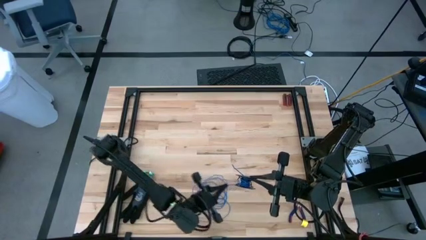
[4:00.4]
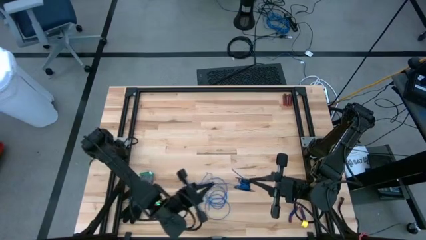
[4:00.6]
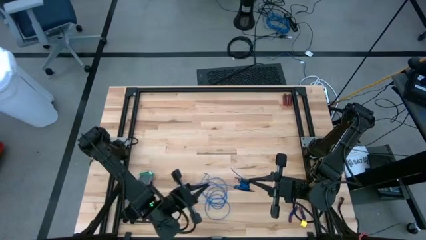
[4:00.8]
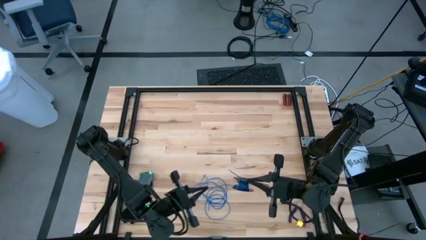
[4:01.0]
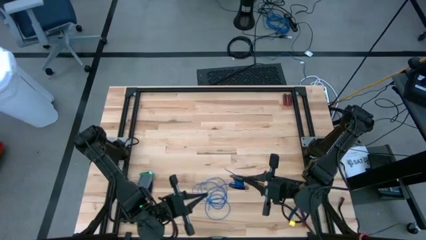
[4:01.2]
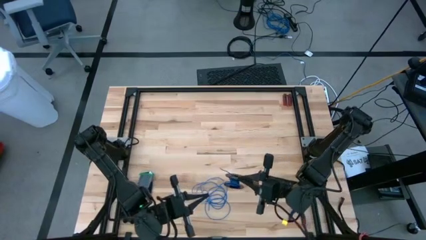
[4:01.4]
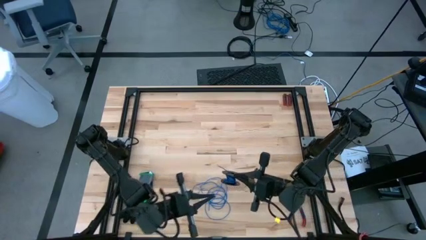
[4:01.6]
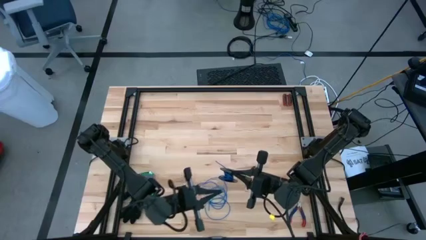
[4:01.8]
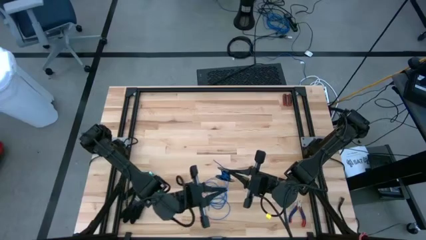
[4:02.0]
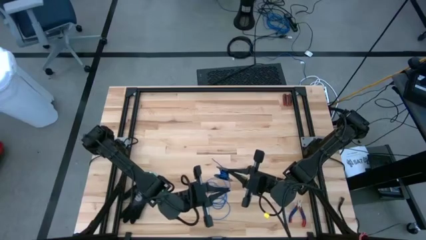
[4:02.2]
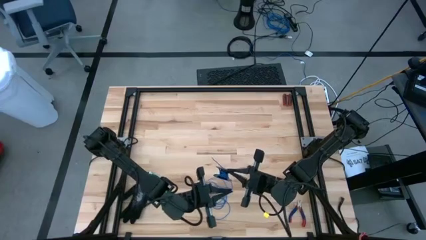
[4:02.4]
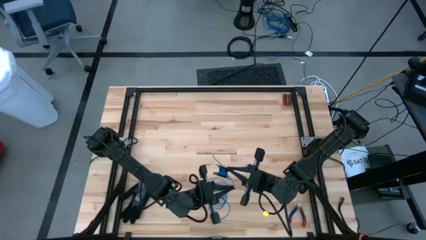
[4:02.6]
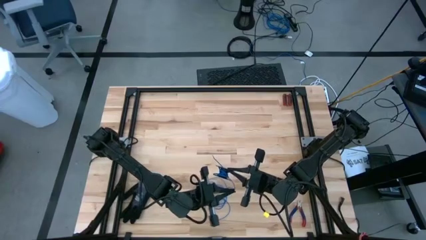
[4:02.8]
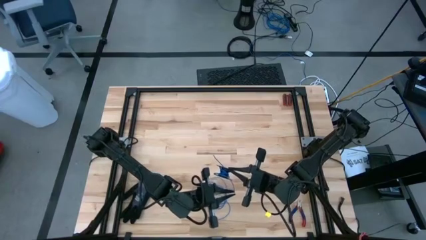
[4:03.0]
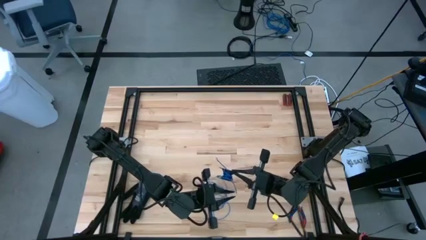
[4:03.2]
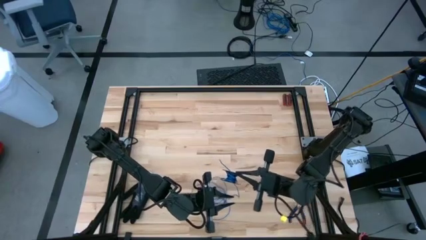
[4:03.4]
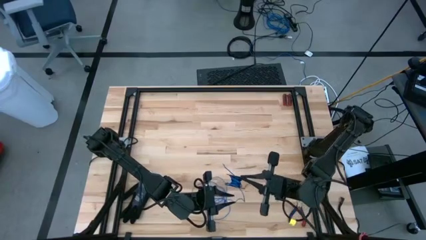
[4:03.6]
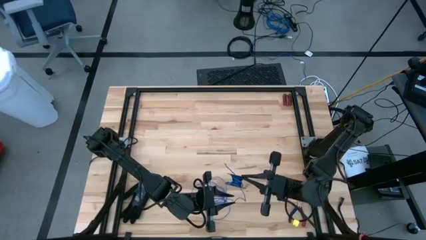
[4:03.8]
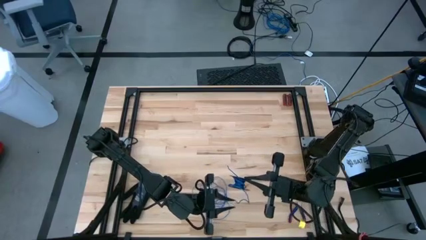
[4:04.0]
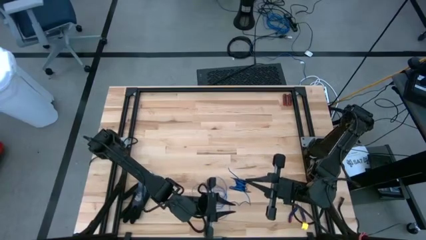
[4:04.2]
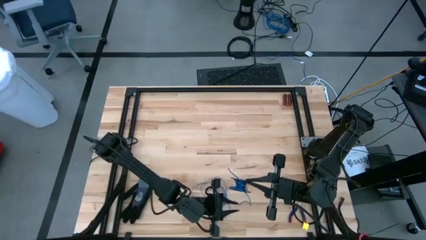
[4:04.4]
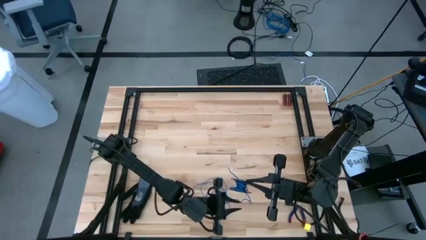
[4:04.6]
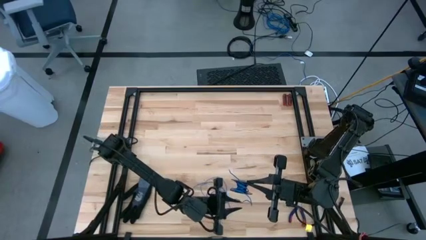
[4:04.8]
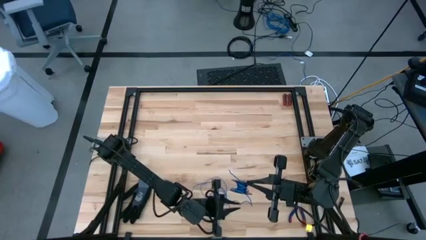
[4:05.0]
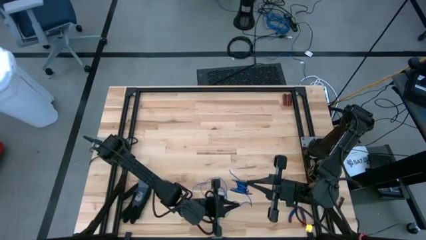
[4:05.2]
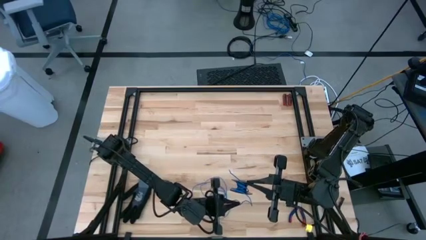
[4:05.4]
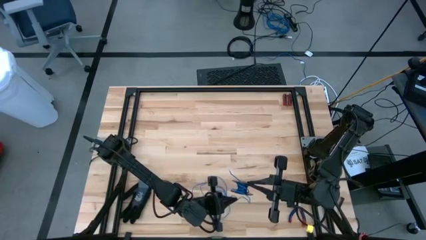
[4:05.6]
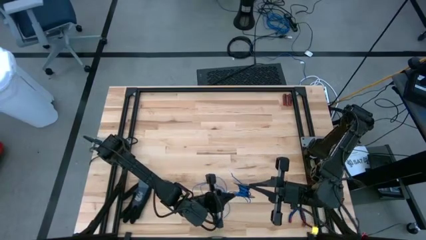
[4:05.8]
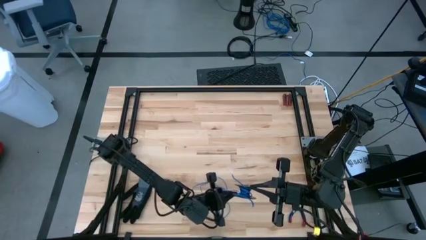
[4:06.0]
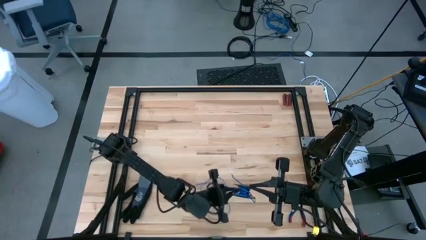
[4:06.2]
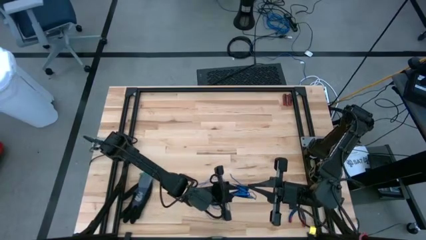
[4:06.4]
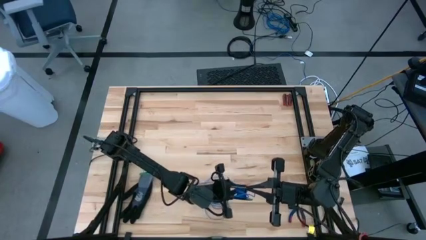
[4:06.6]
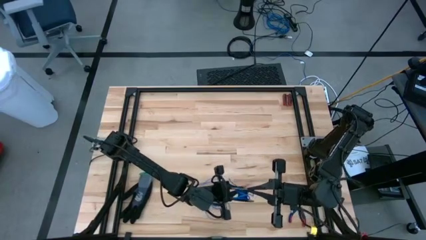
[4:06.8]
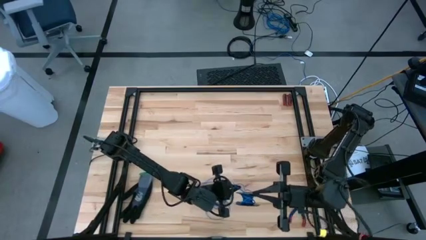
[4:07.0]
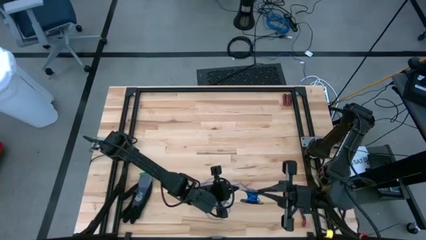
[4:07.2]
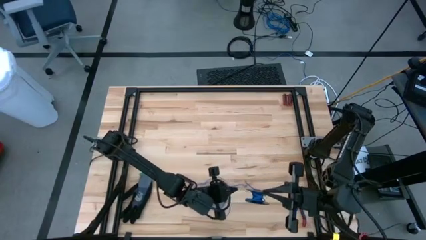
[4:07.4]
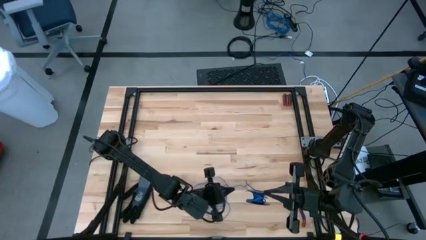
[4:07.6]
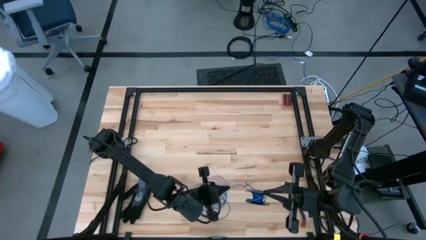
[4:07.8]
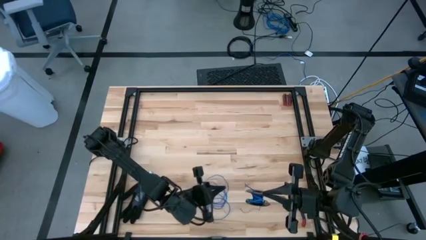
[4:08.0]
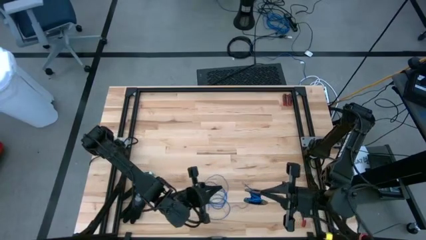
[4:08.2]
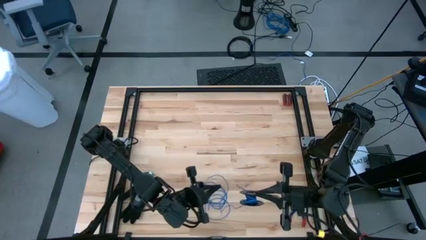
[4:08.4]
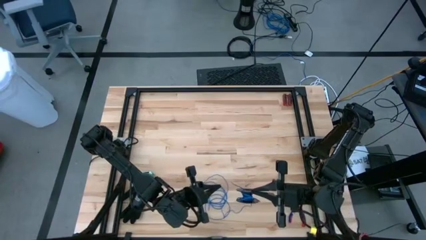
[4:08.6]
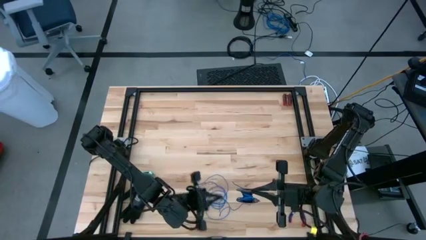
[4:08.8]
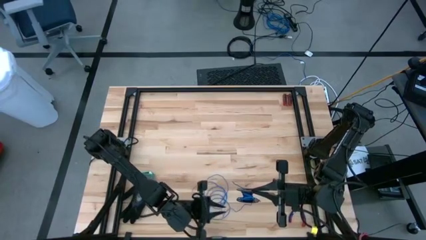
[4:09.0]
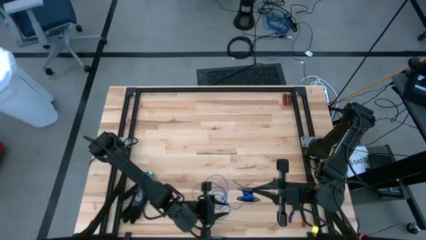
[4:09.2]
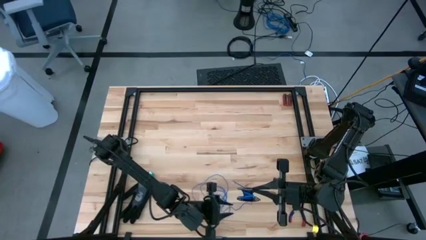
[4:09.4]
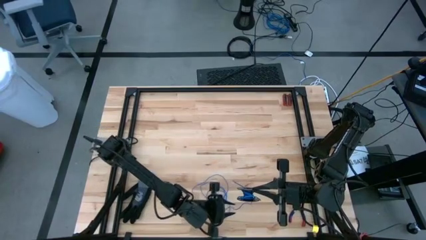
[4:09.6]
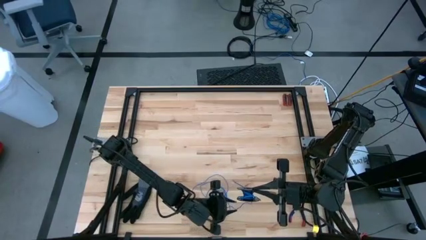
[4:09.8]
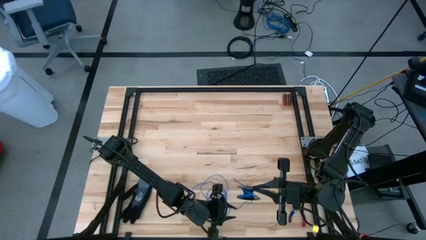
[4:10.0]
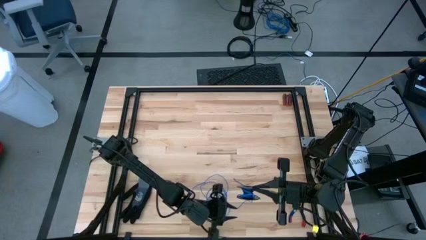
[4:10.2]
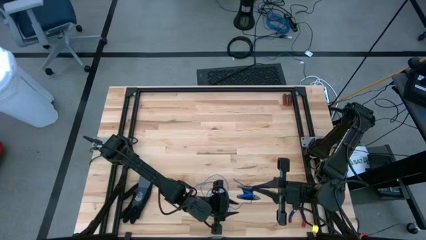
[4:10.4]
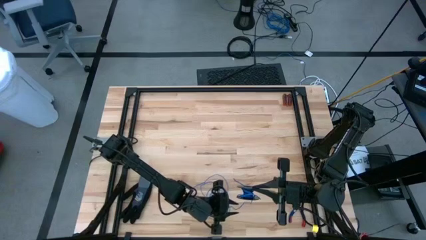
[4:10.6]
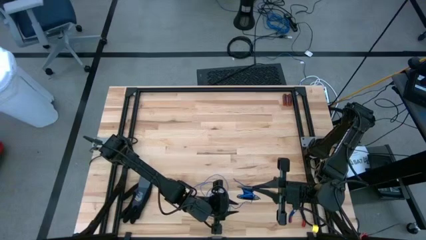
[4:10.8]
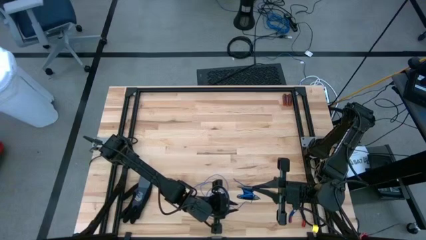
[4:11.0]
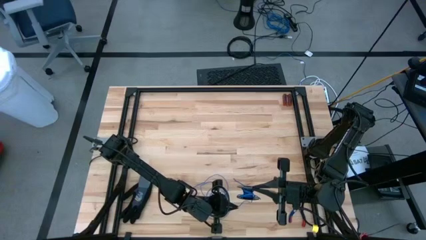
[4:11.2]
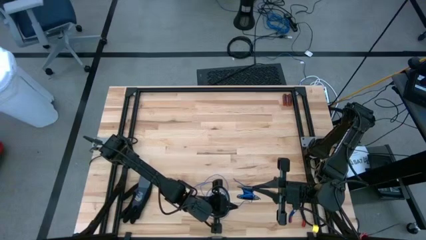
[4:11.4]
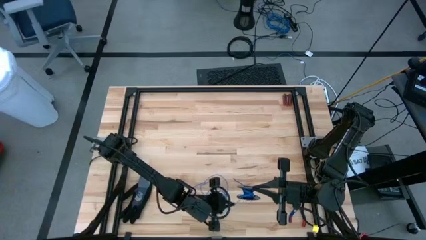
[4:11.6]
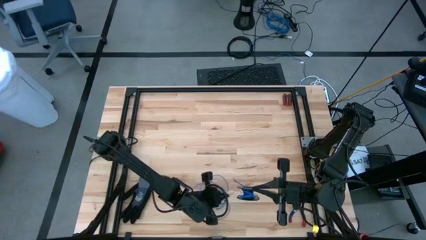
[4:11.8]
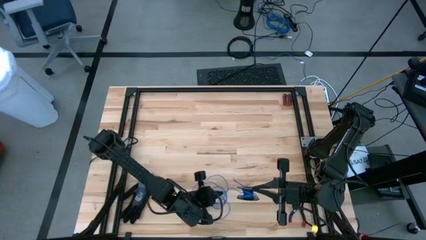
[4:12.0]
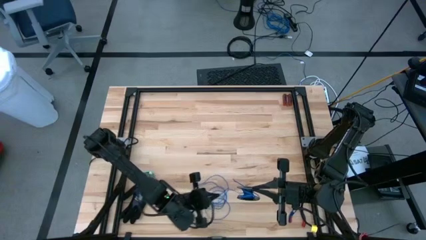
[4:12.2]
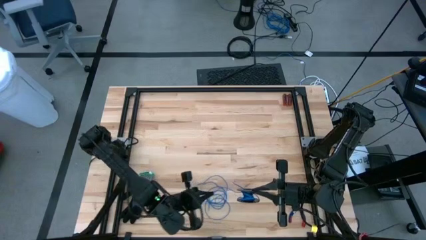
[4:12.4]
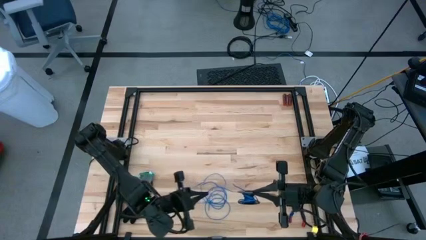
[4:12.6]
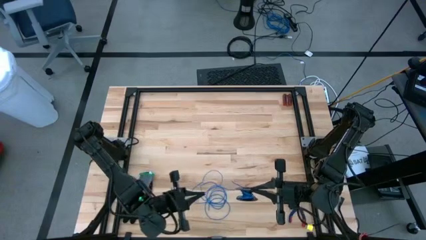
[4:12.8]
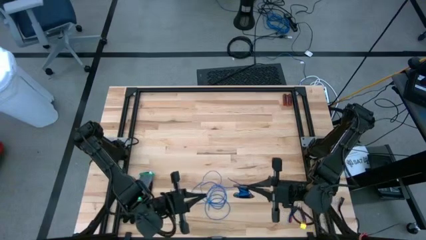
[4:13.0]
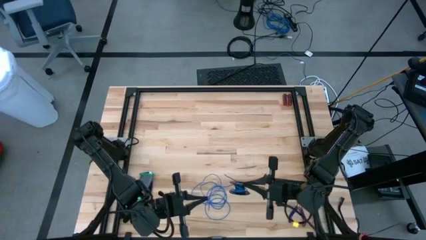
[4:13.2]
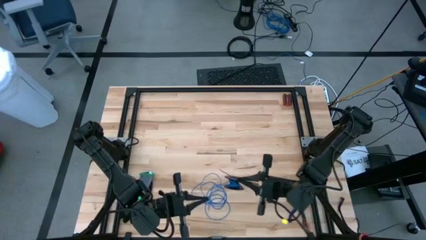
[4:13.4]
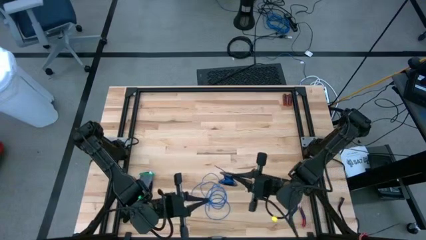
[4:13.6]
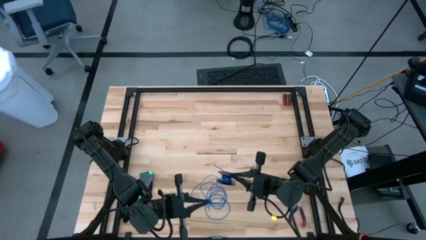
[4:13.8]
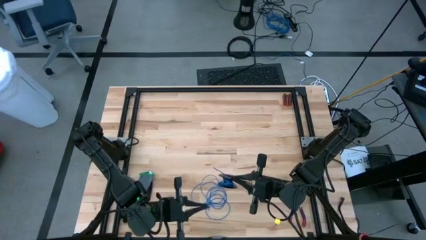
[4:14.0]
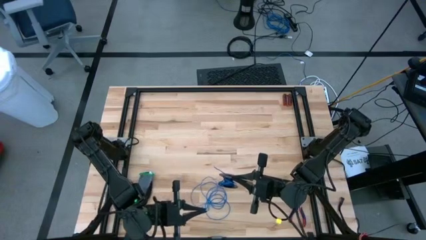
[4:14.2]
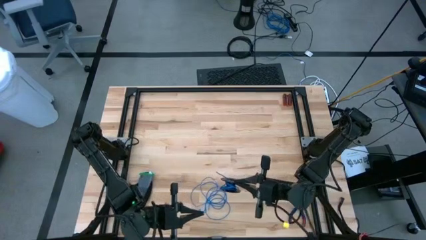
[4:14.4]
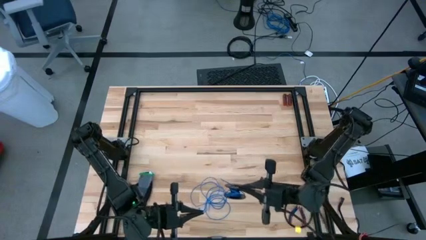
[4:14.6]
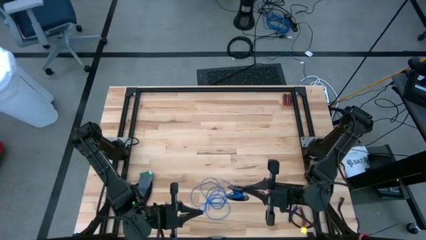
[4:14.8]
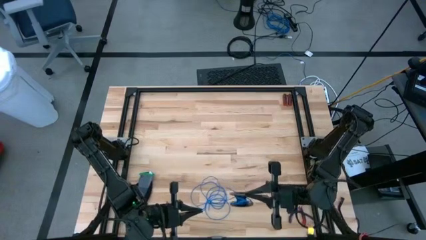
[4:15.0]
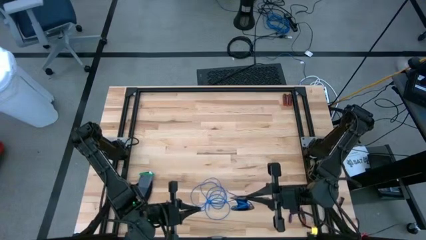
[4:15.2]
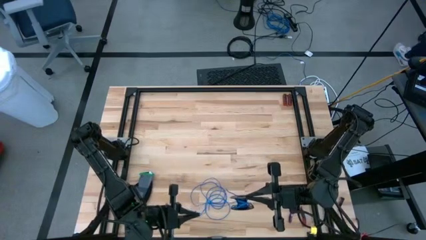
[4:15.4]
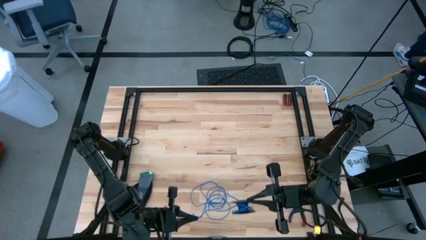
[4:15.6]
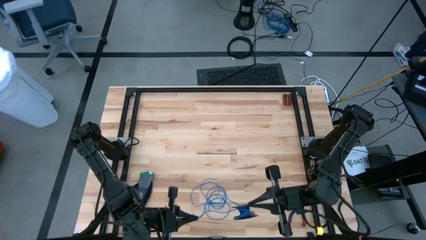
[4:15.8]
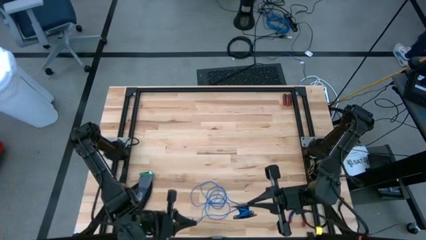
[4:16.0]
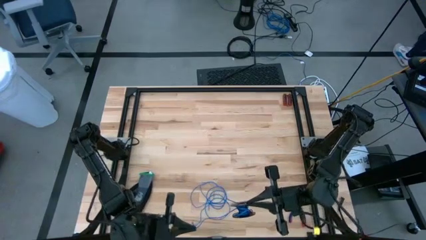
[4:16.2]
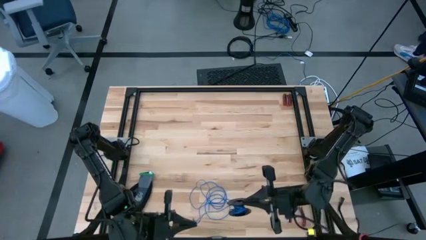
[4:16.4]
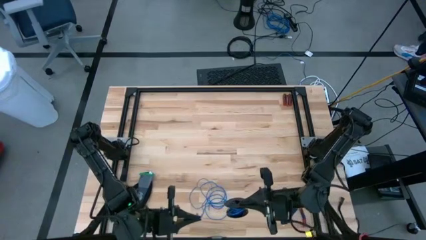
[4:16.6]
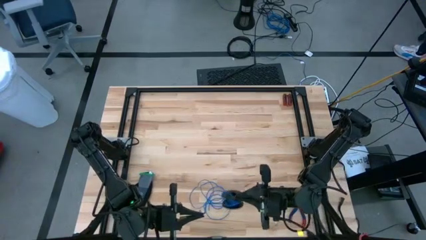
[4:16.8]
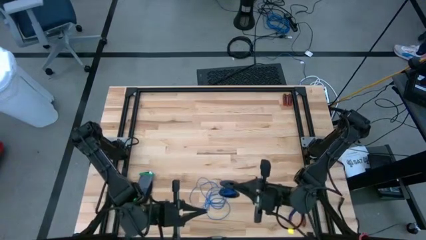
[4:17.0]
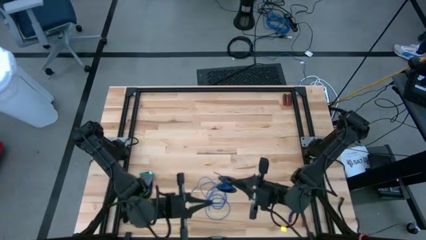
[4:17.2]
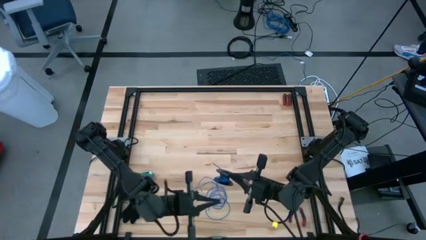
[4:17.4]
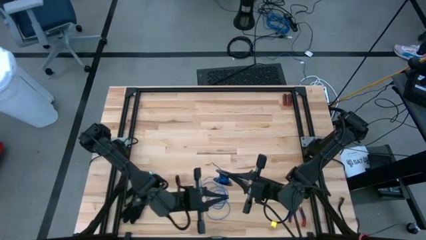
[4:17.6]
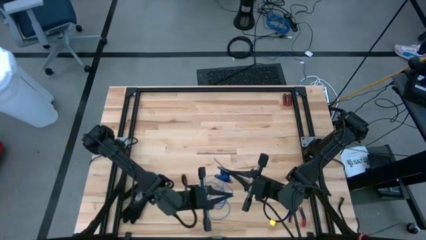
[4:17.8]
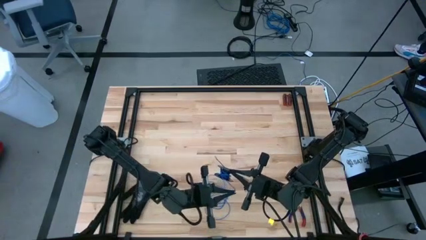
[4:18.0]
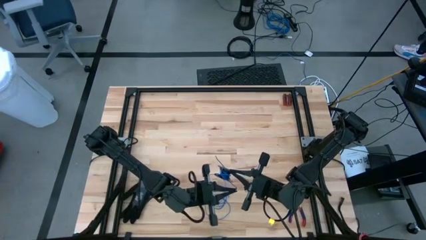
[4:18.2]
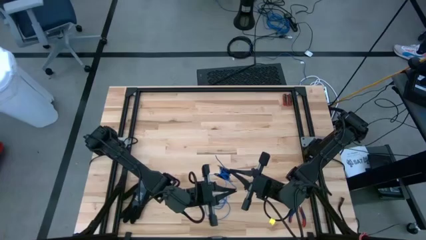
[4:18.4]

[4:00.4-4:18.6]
Task: Coil cords
Coil the blue wire onto the spool
